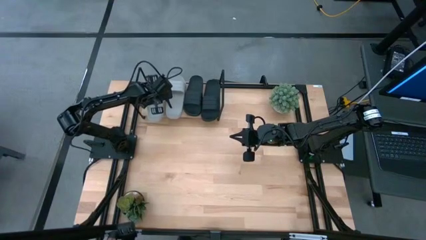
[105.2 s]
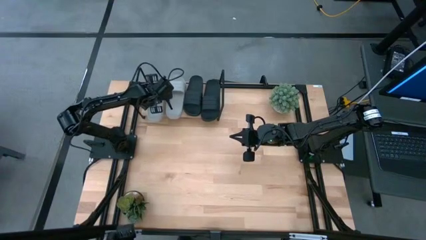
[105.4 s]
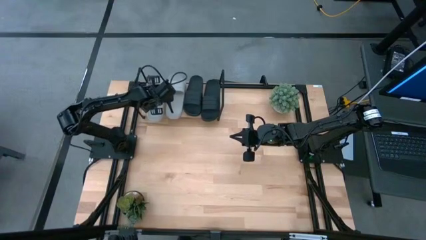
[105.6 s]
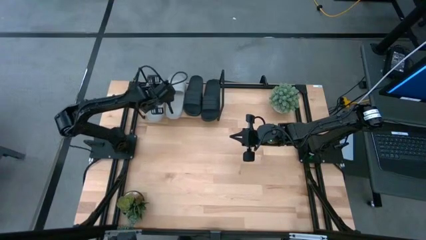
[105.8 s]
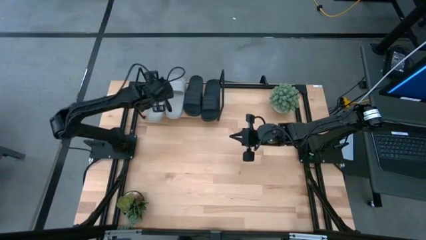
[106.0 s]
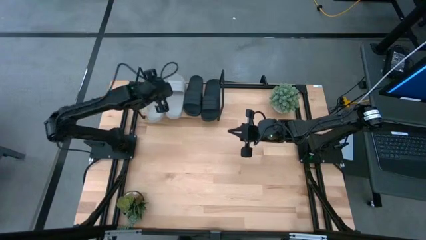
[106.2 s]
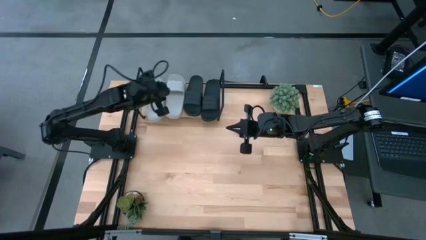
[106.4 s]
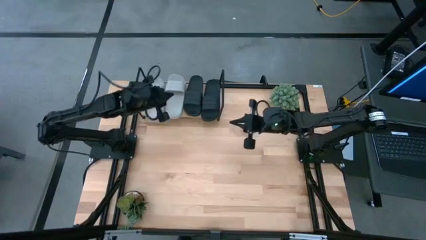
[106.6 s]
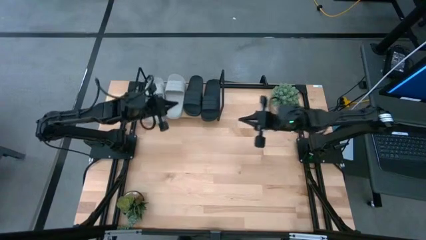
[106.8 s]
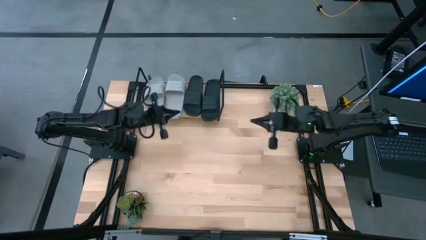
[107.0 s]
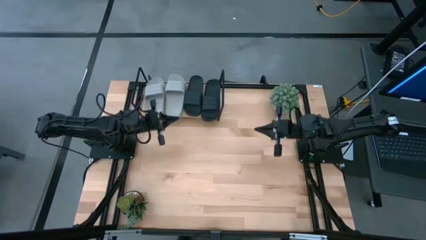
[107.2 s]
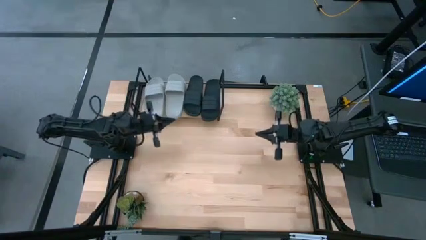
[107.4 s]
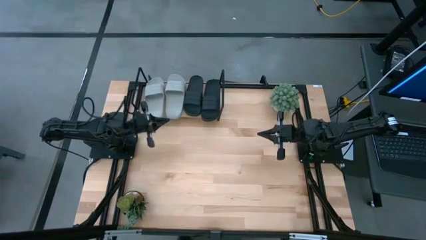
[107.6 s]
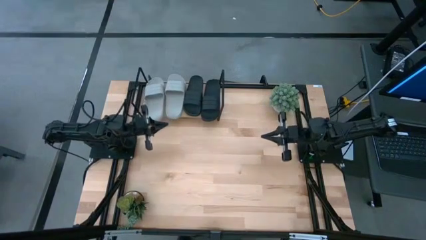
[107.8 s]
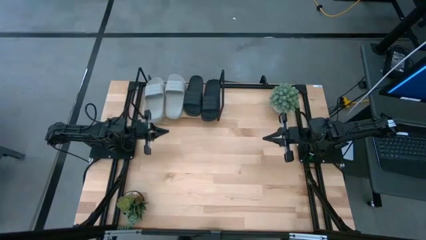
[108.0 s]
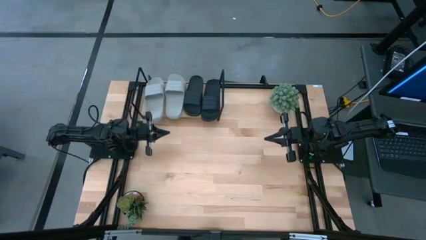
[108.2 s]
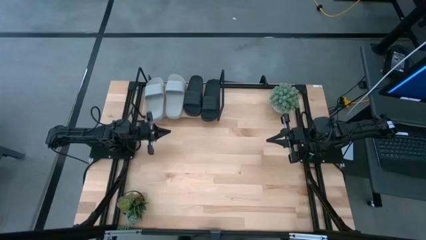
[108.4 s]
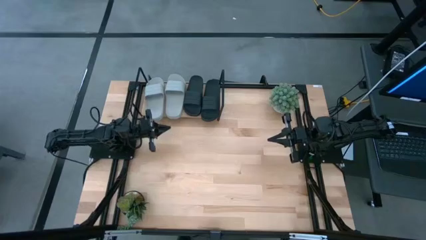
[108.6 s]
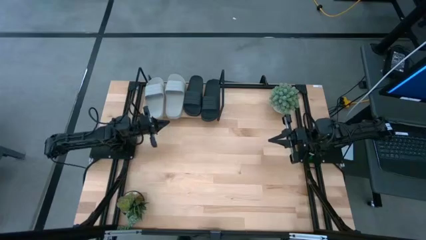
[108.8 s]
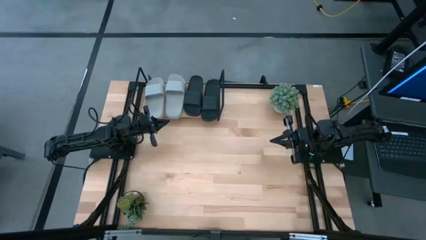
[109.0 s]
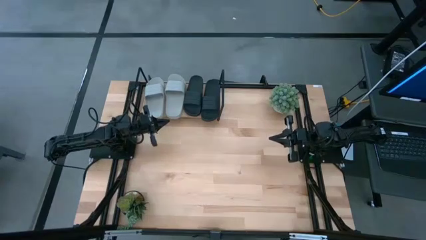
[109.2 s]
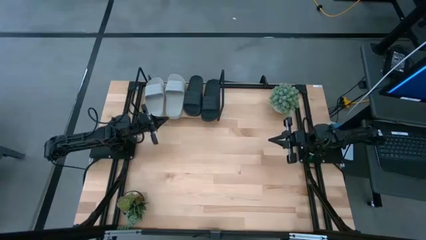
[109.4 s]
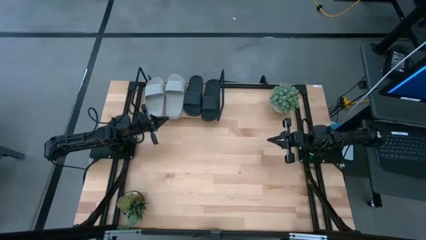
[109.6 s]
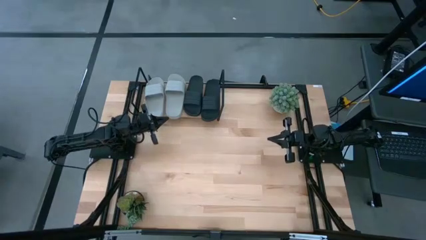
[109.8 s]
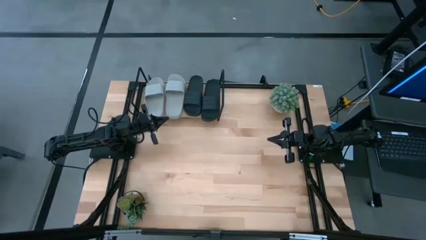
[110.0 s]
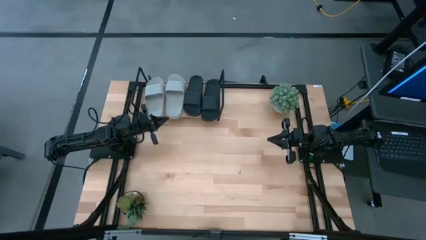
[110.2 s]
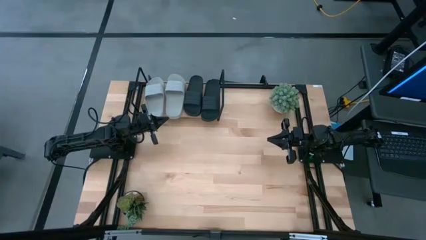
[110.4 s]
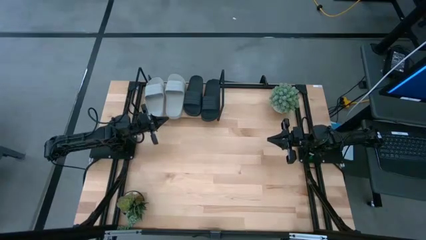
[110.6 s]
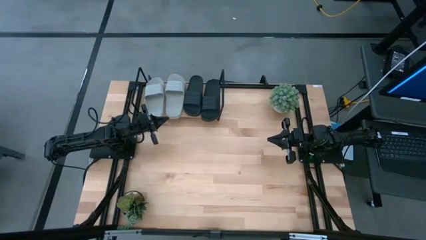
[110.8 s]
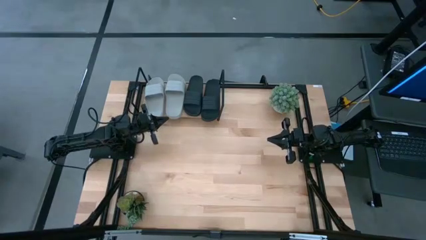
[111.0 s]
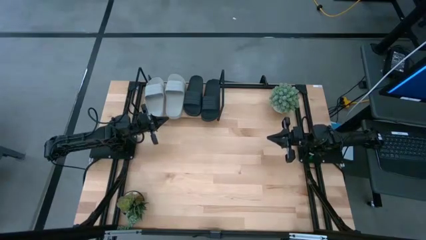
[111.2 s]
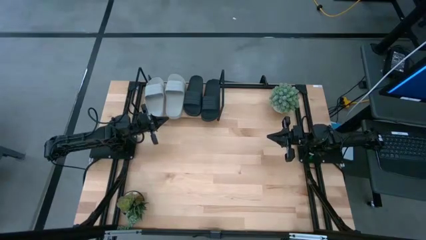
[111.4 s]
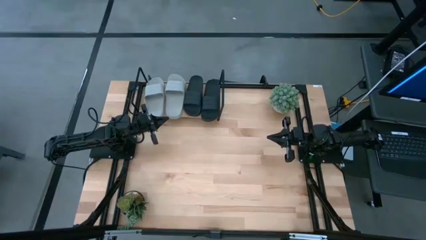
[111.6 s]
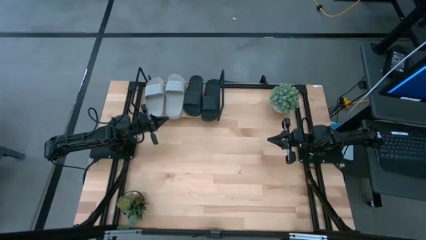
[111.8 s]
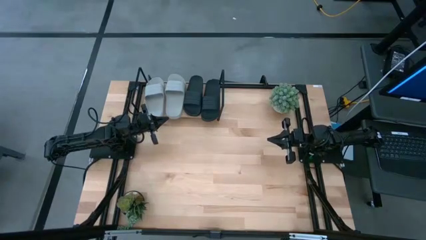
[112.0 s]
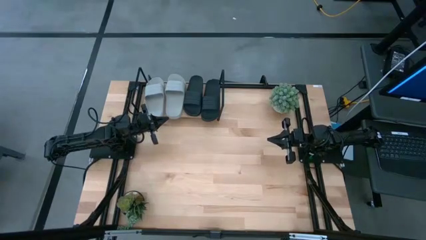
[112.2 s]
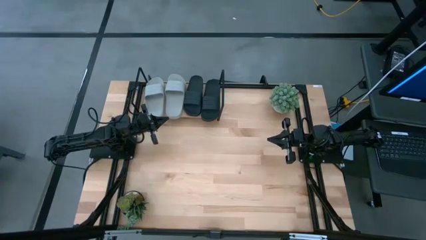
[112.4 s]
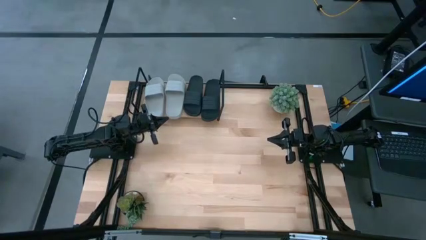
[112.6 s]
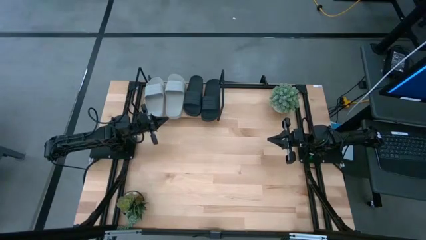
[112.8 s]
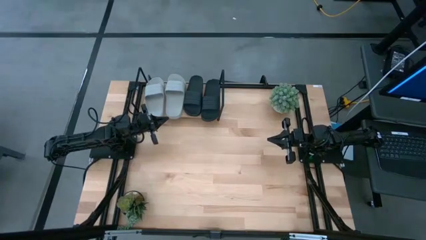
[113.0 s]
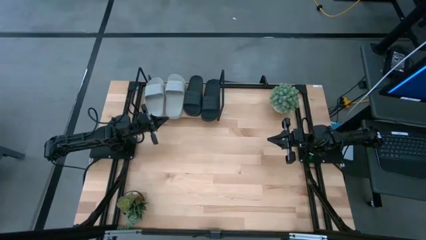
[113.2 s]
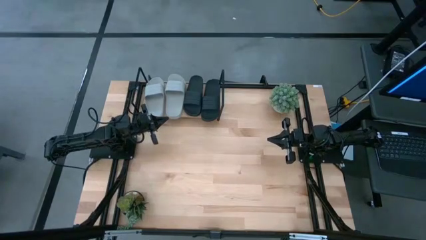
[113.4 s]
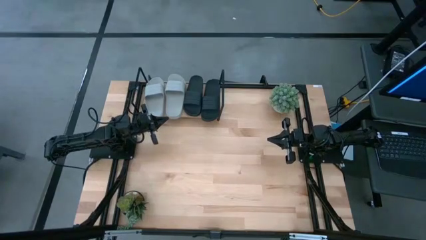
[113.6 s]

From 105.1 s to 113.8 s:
Task: Pick and place slides into the shelf
Return to Home Position

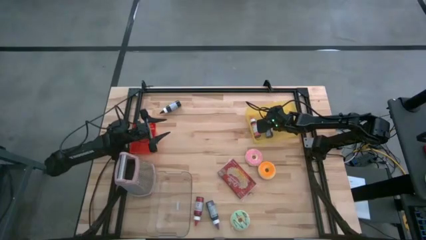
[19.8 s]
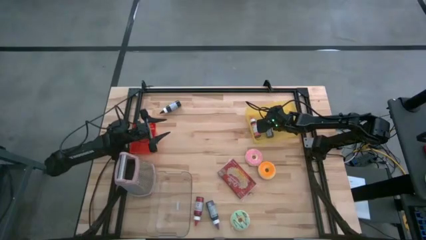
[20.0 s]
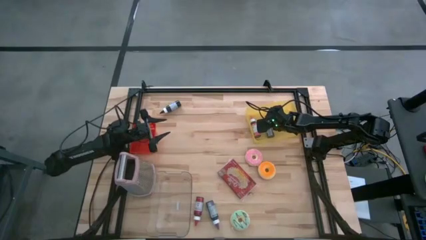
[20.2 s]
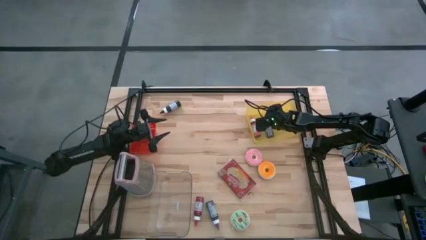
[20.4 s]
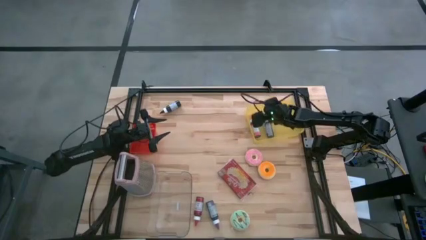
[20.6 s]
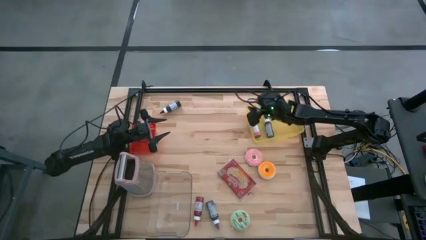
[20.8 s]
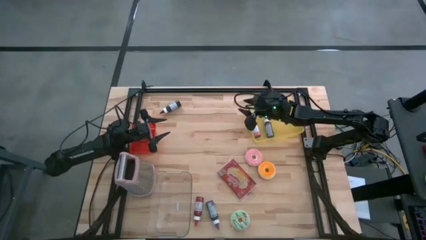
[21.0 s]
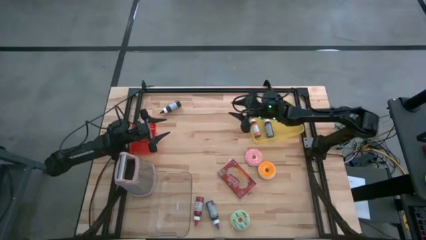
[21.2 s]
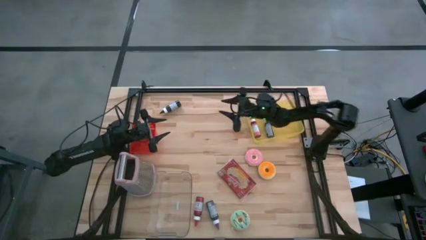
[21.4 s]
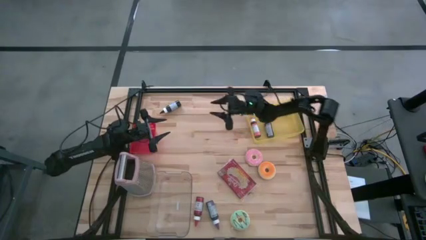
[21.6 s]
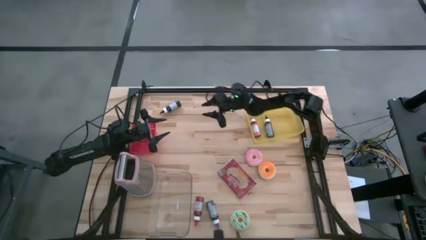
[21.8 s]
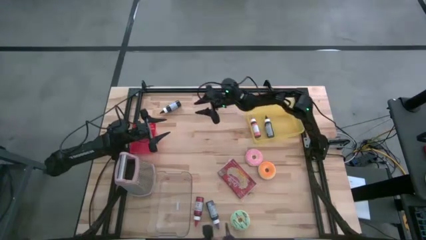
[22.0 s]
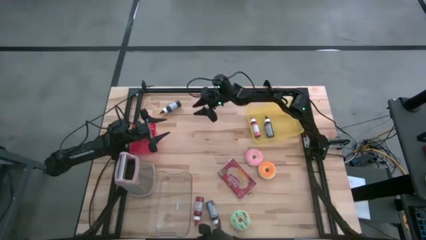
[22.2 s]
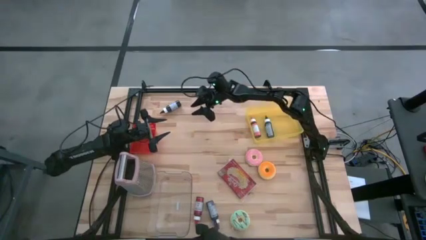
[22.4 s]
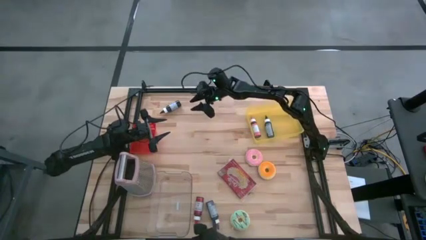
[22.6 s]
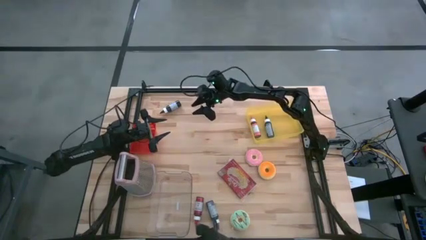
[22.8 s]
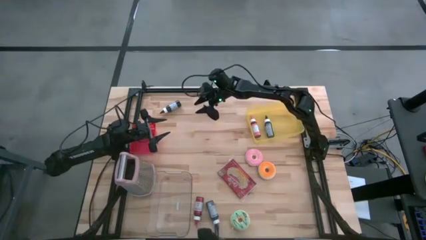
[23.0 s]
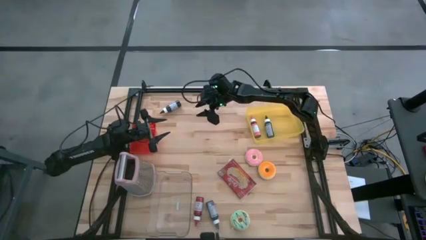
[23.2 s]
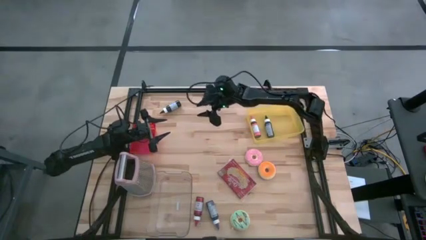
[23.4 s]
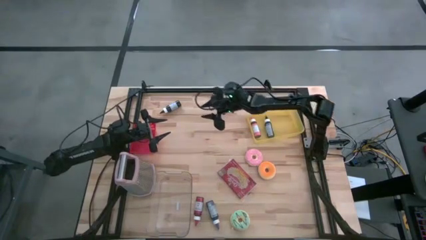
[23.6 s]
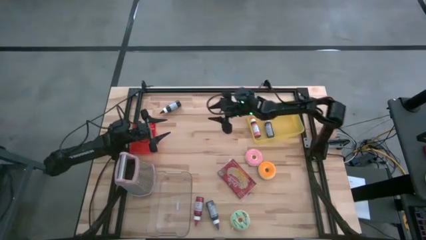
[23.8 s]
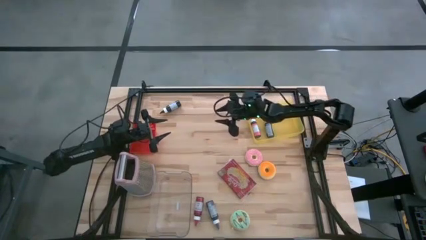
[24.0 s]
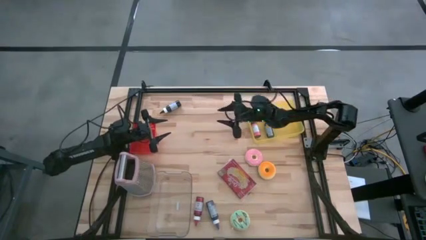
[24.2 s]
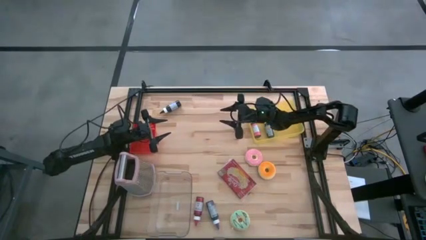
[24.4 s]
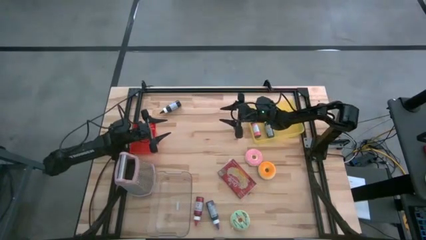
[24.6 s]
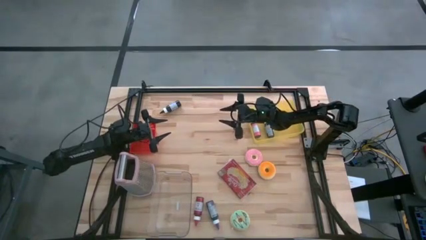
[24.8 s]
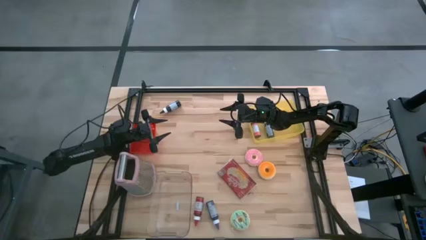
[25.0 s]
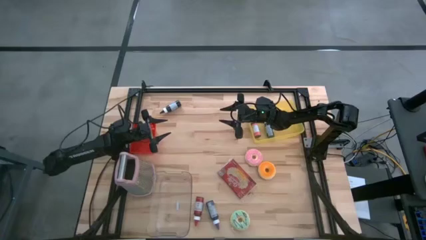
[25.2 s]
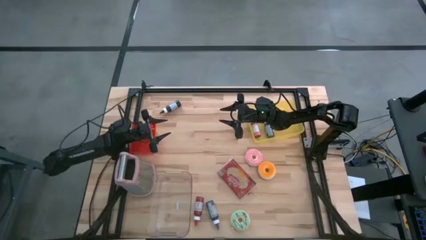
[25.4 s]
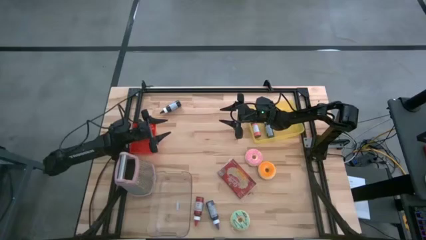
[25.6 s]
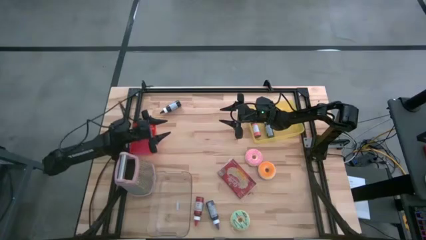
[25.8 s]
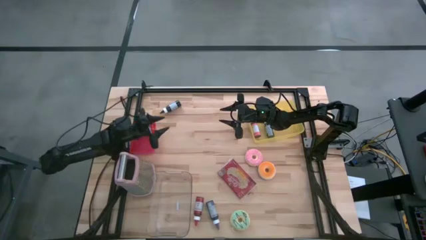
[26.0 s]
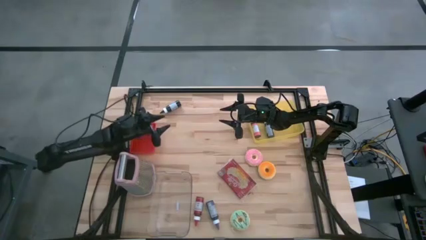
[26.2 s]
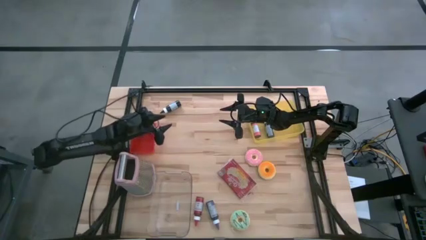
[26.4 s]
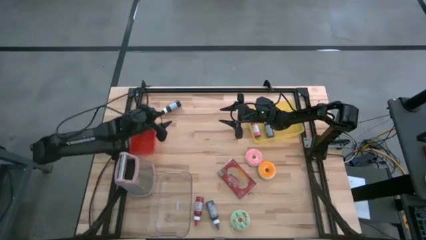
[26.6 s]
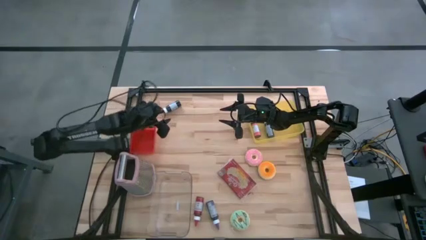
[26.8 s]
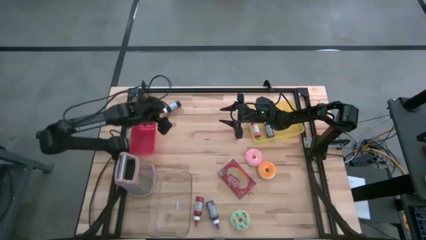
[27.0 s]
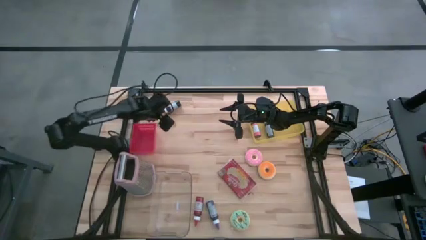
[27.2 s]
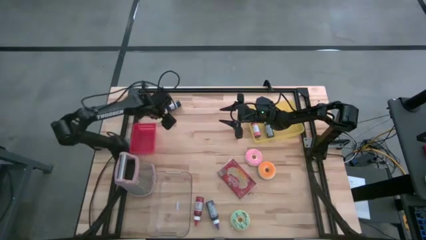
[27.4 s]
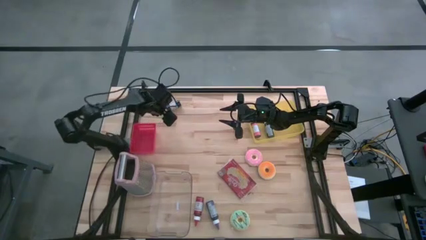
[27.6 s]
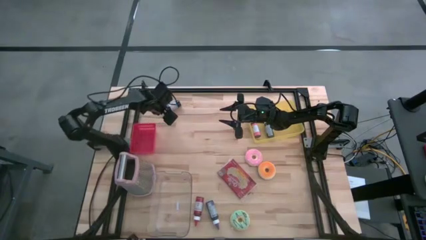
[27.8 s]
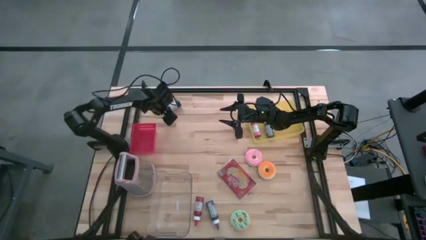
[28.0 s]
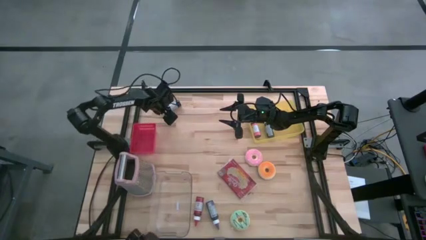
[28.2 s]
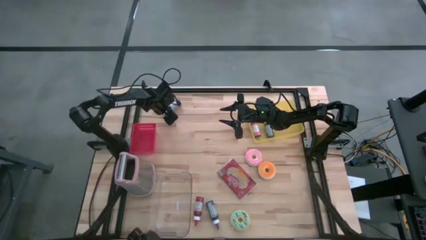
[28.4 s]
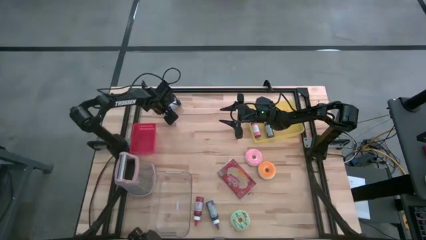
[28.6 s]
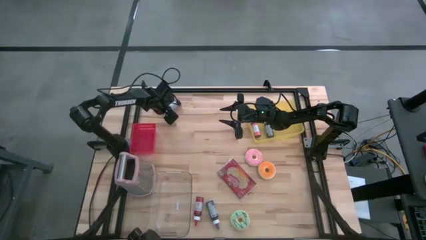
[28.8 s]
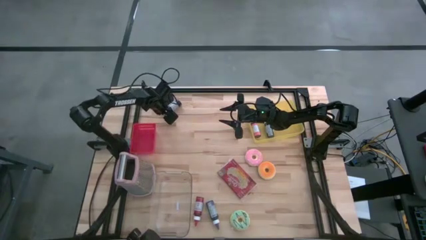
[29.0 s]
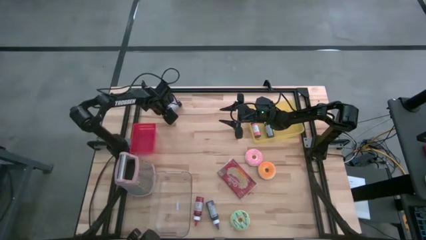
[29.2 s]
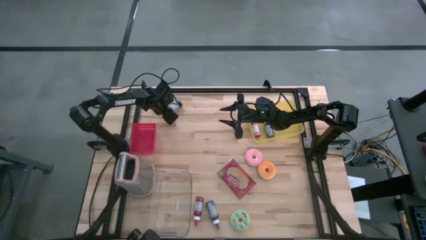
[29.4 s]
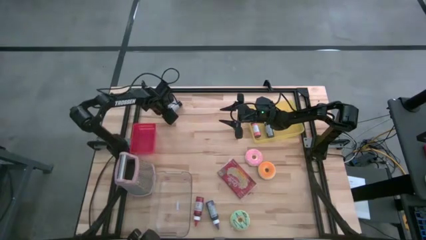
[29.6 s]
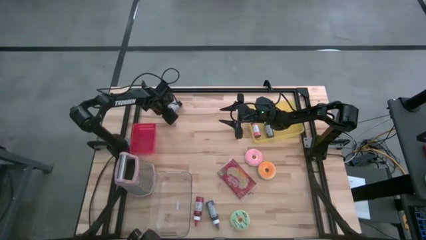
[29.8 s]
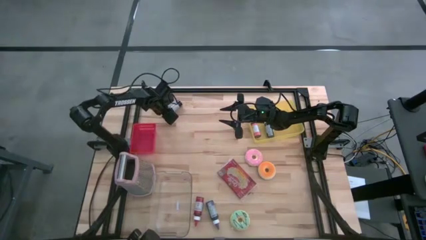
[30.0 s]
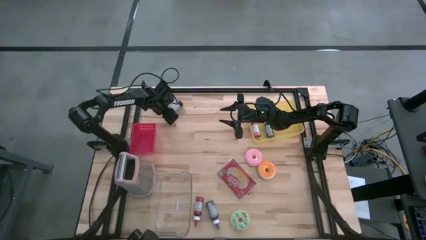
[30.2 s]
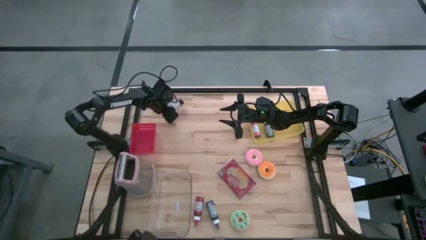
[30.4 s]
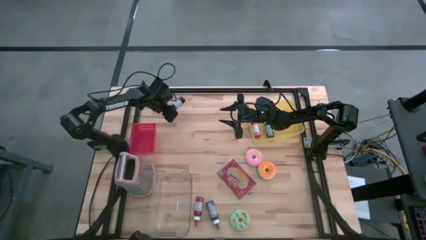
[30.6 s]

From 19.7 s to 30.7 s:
Task: Pick & Place Food Item
Put the black food coloring bottle into the yellow bin
